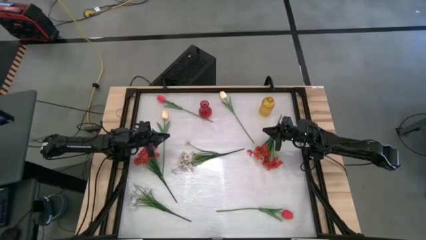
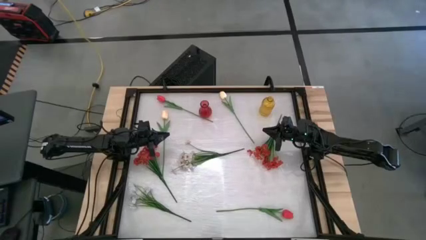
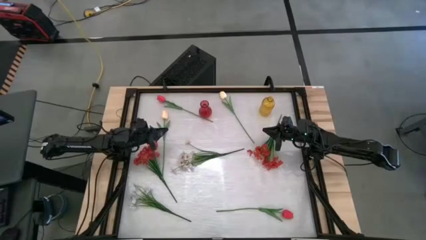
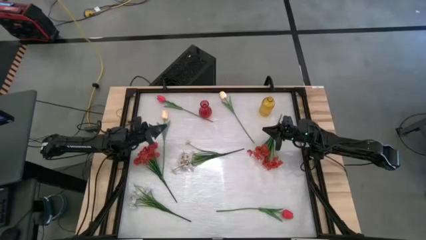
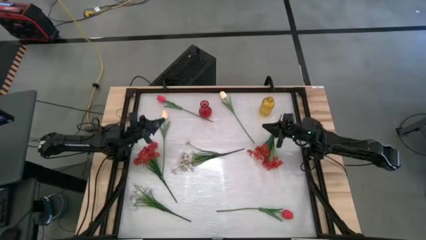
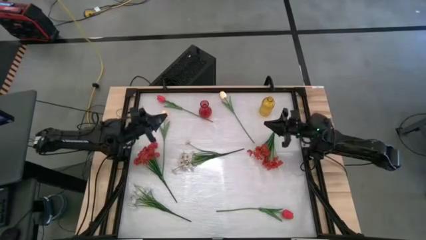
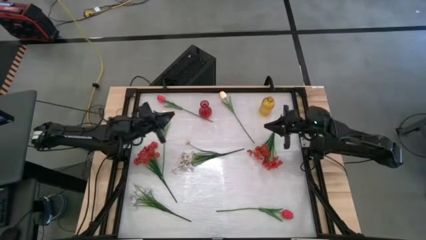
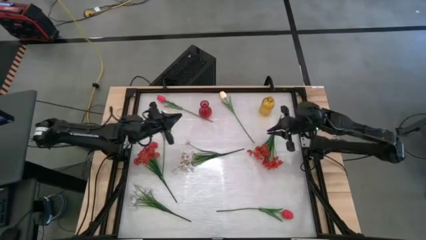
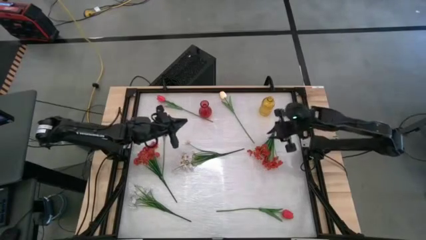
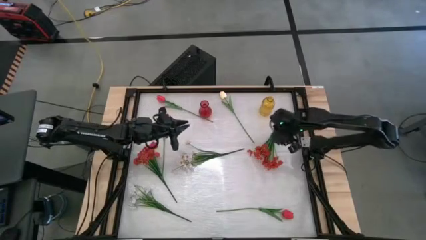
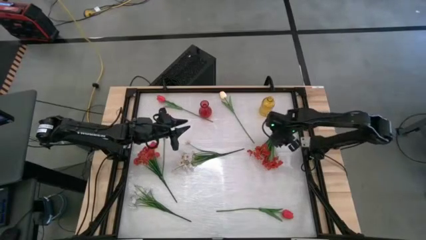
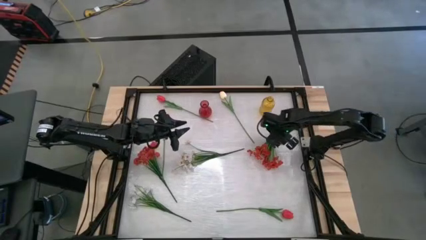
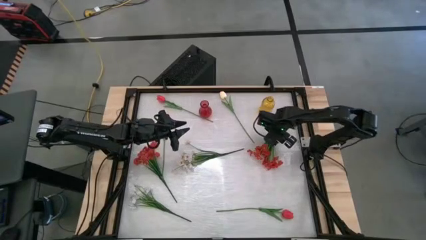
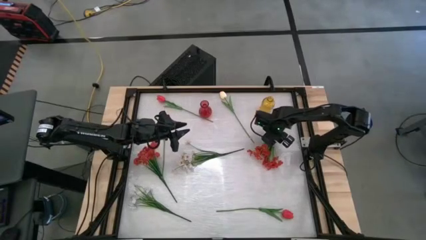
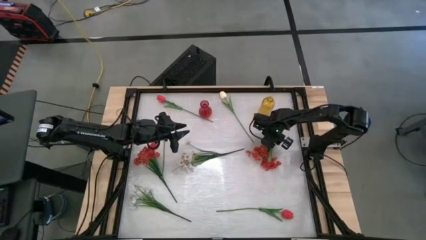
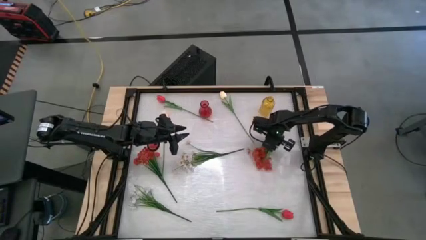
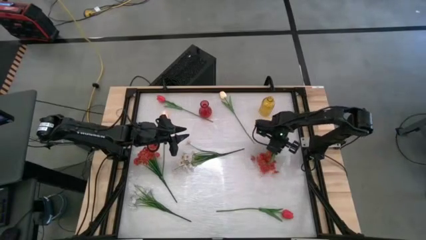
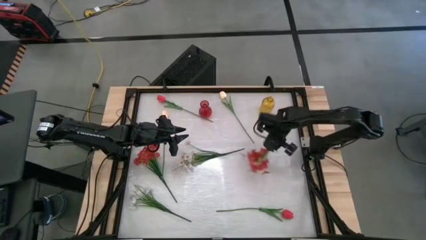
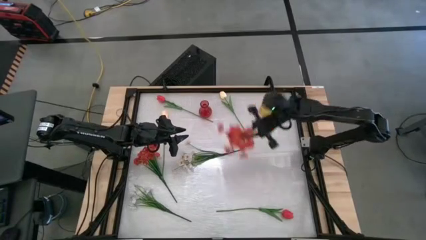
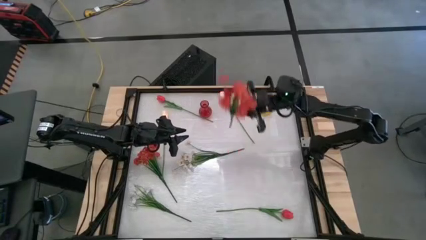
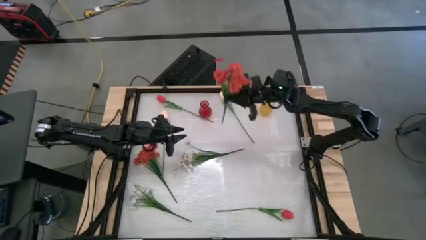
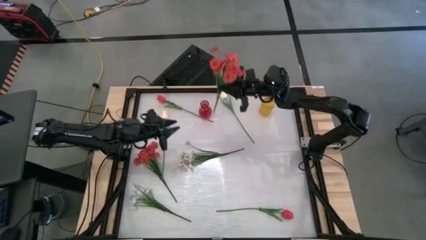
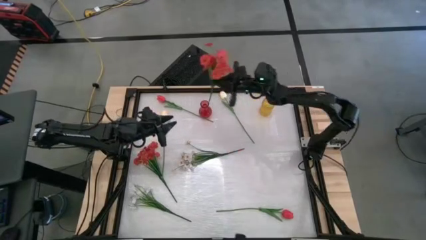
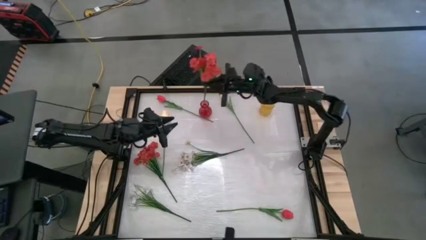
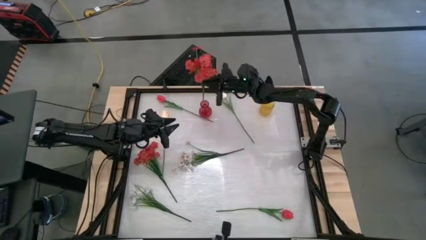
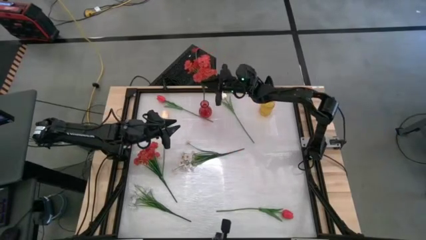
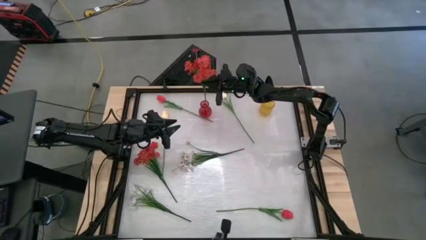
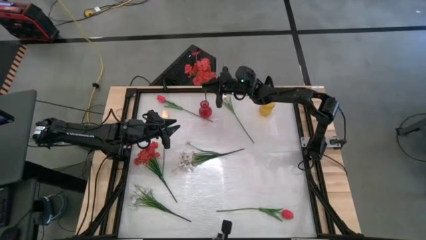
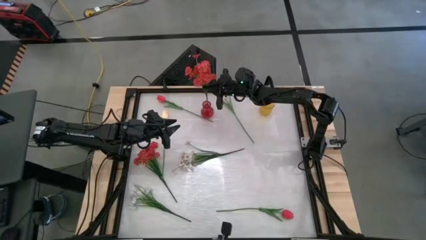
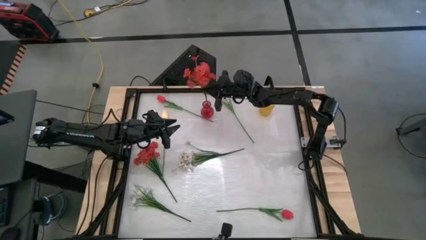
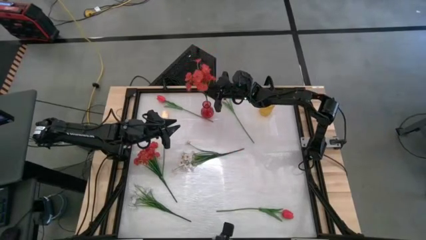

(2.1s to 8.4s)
Task: Sort flowers into vase by color
Put the right red flowers into the red vase

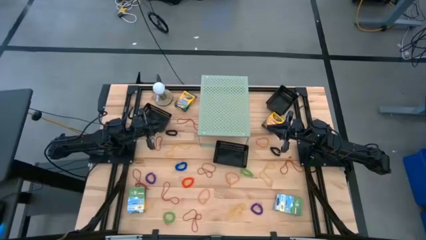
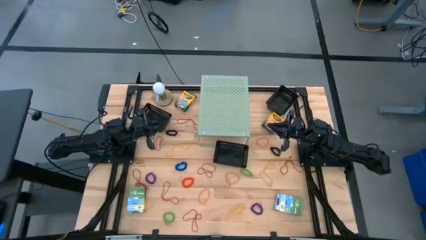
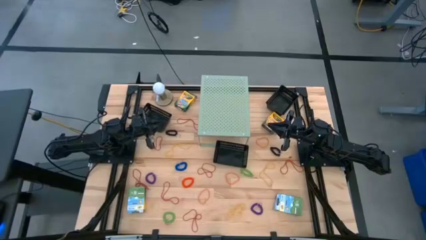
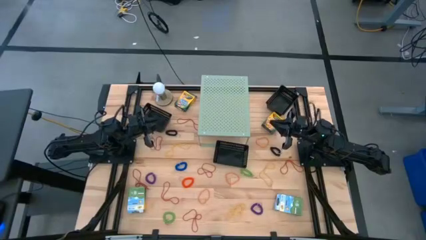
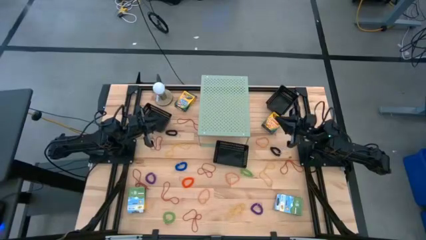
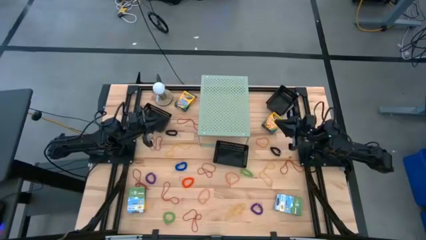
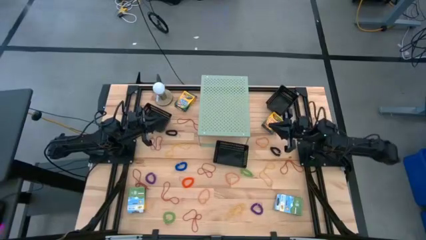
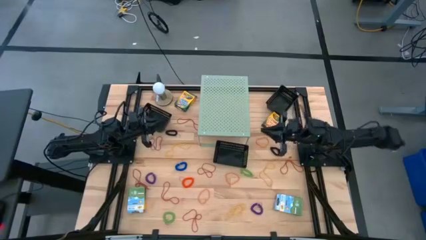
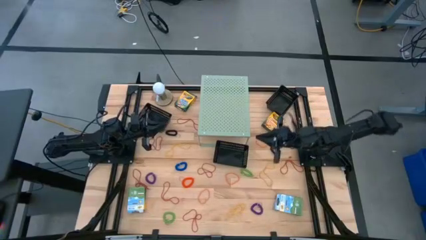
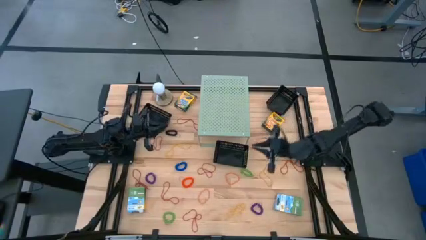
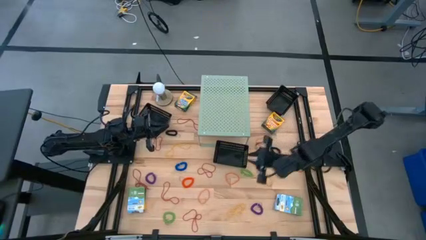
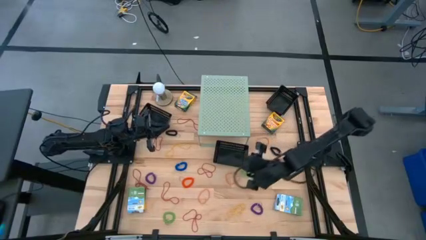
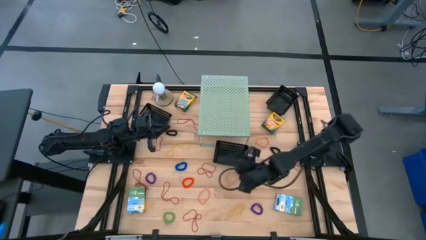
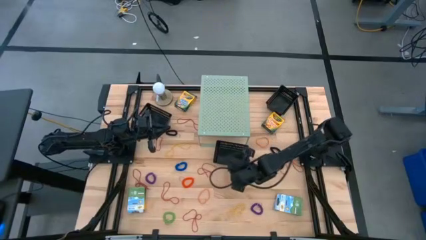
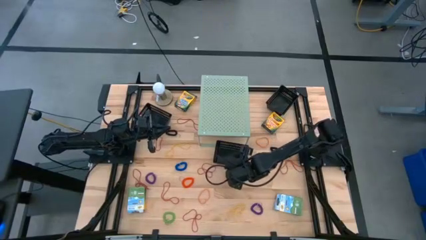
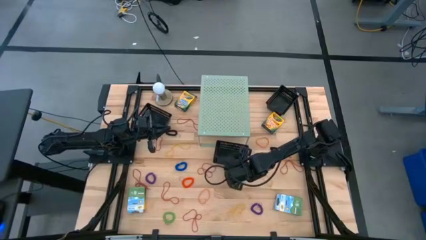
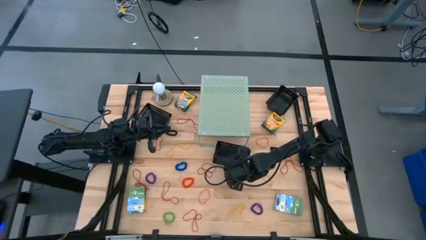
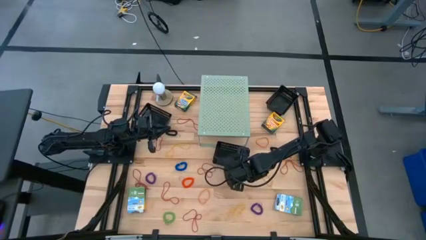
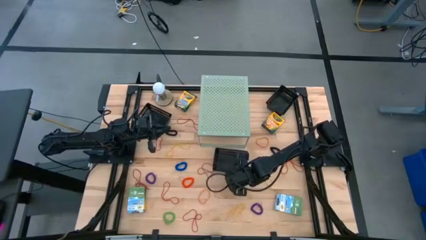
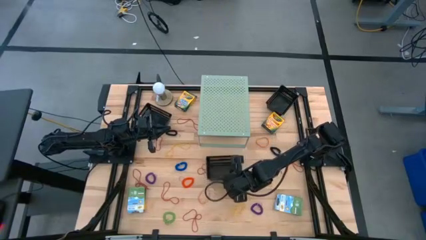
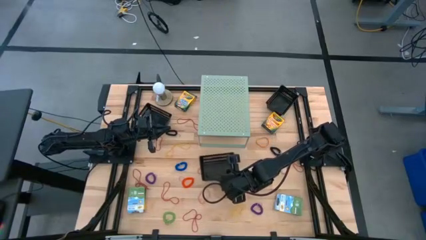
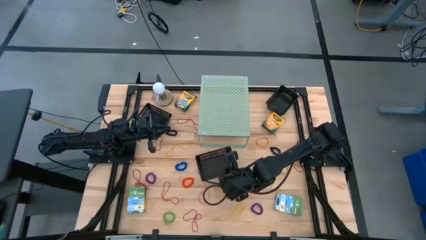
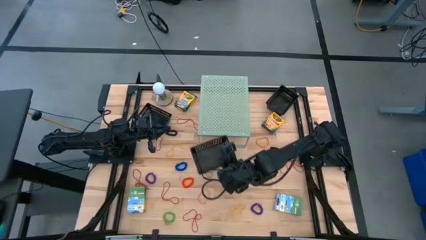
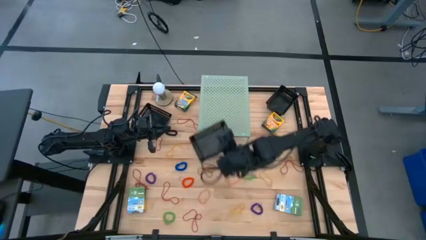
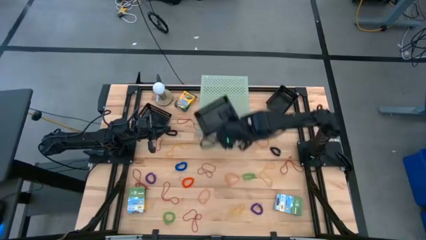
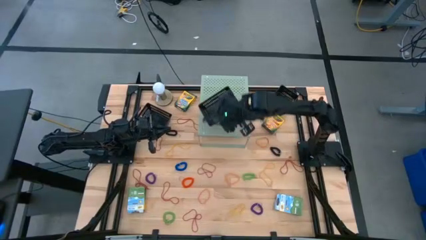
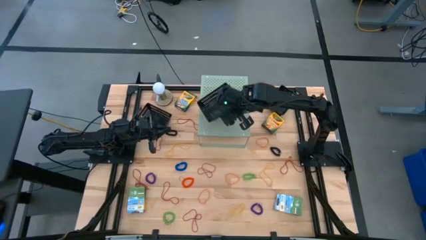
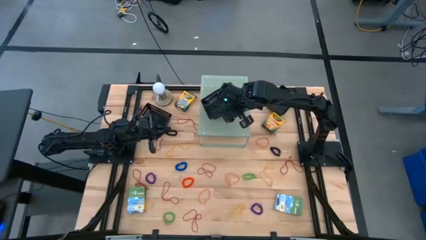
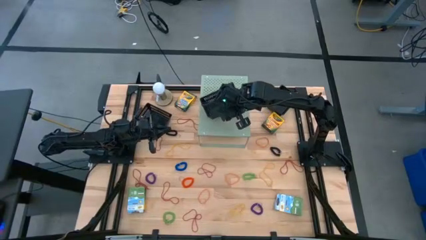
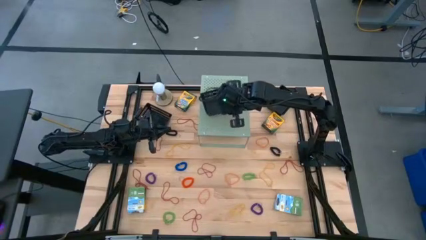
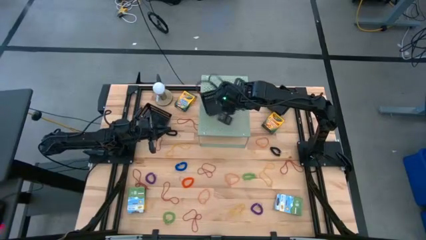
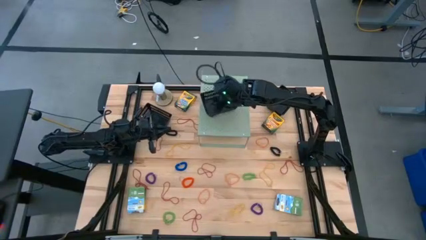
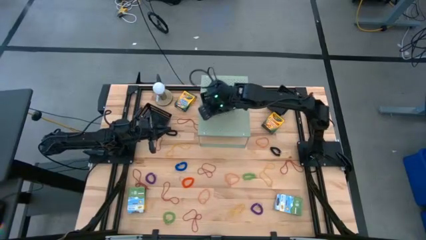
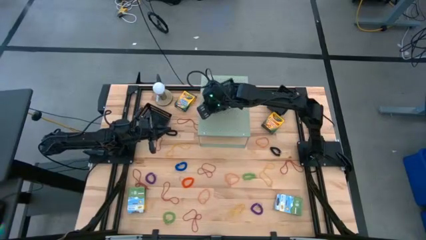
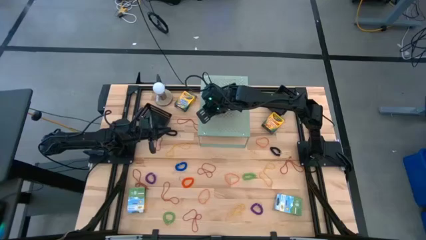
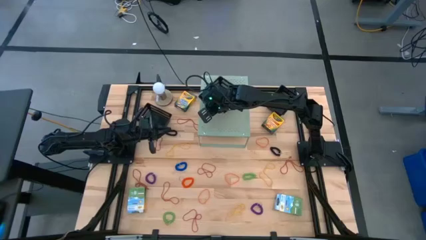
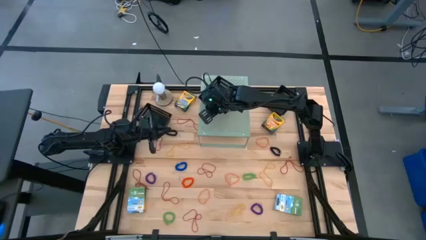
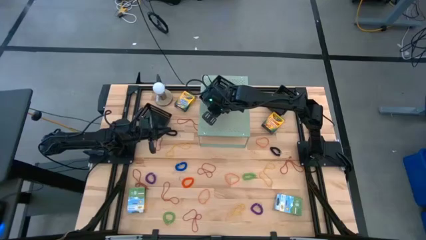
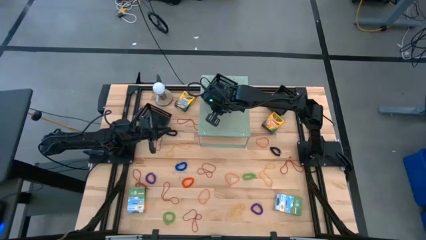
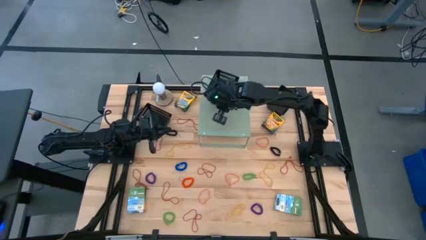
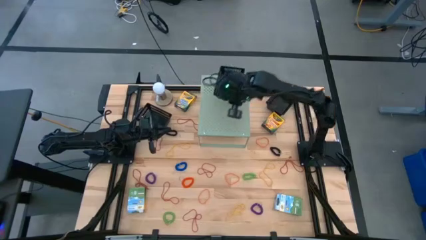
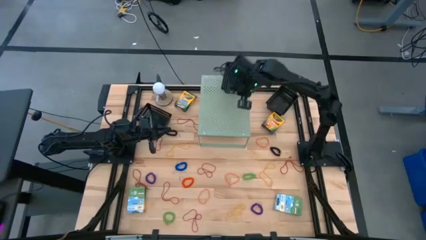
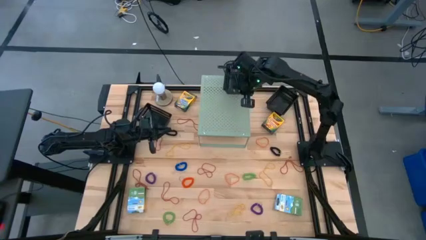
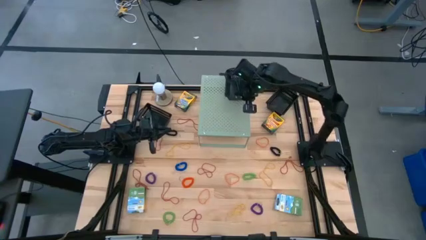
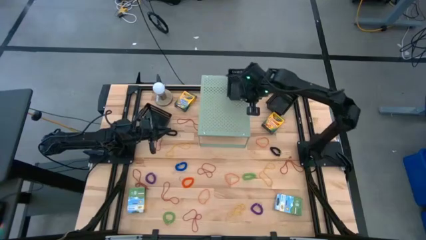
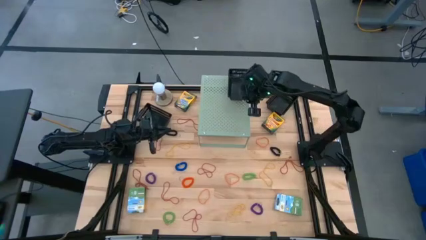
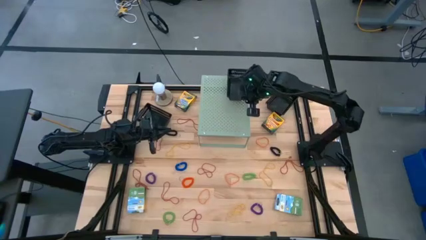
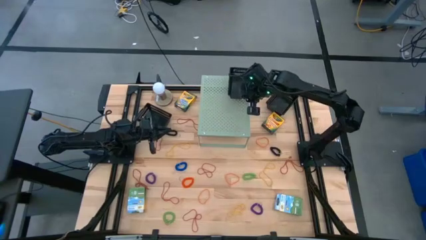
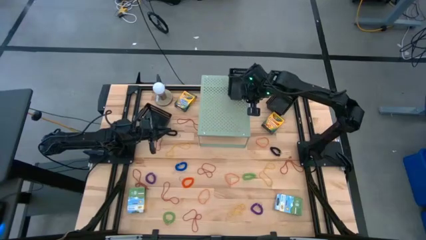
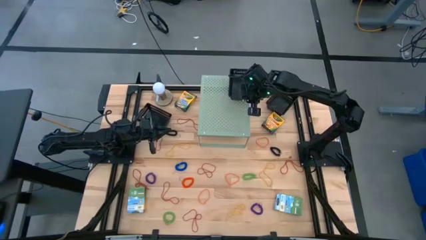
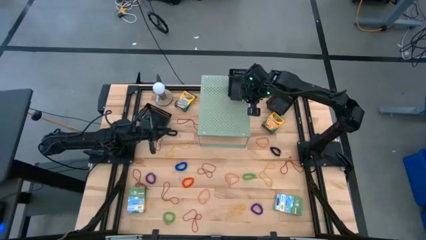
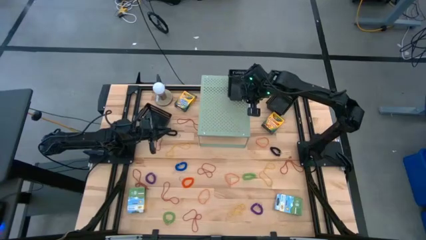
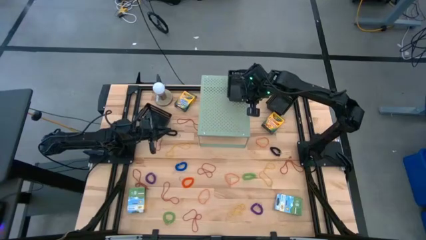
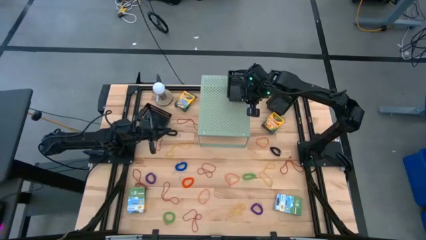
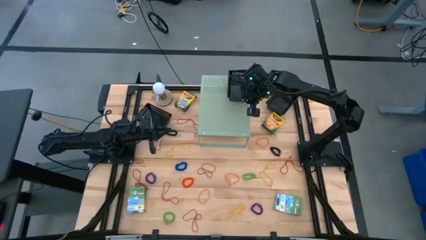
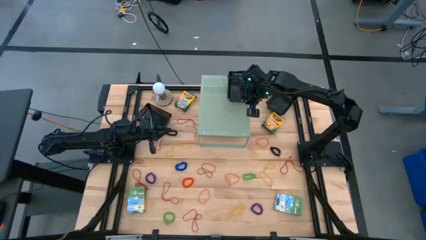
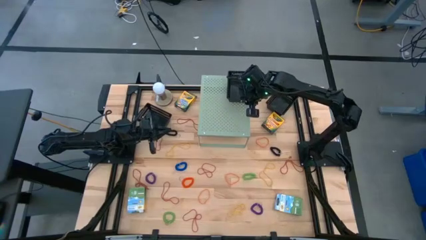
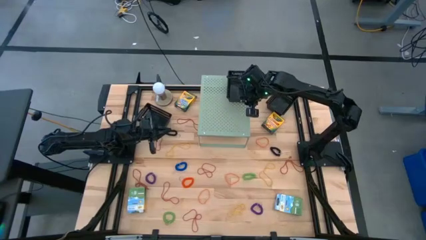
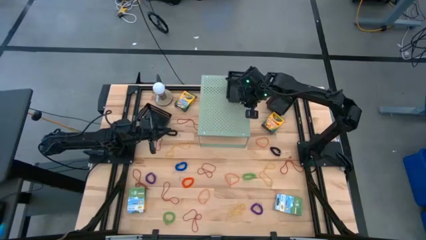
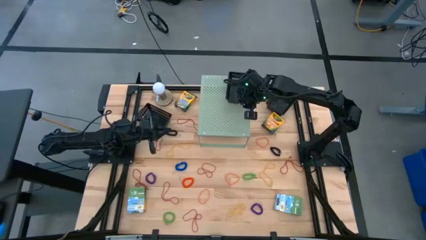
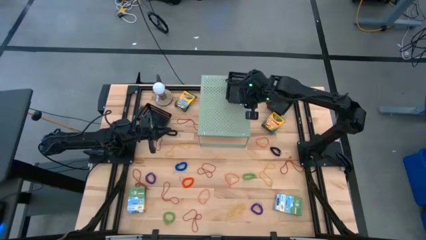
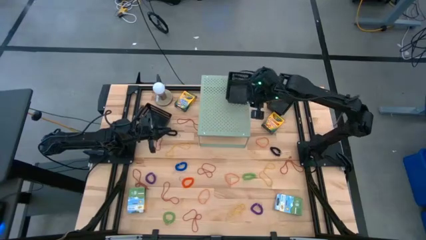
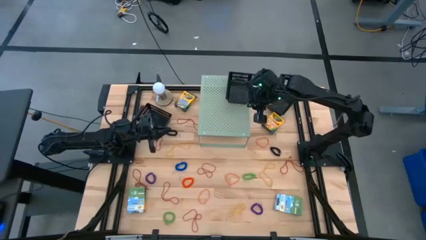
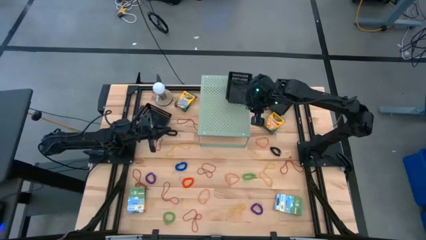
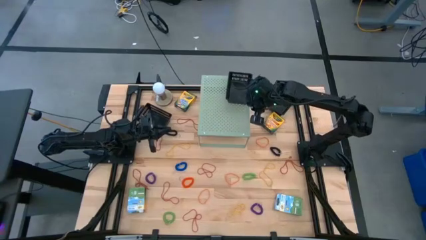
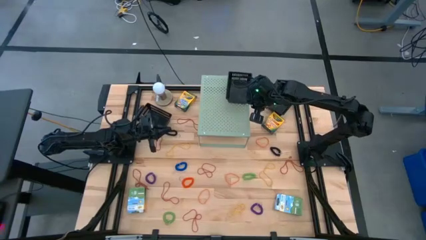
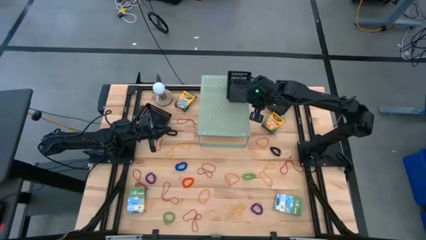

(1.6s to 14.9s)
Task: Pick & Place Office Desk Supplies
Put the bottom black bin on the shelf
